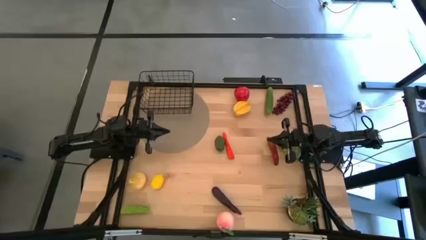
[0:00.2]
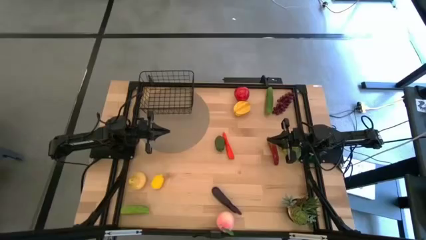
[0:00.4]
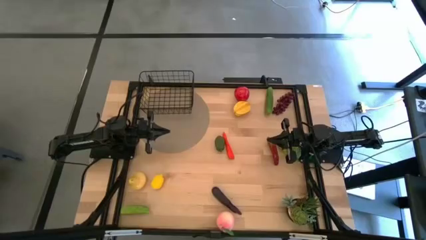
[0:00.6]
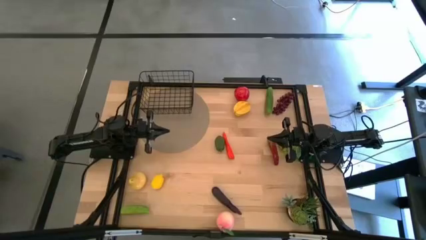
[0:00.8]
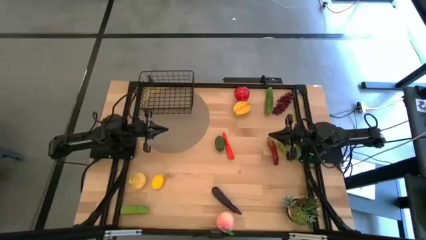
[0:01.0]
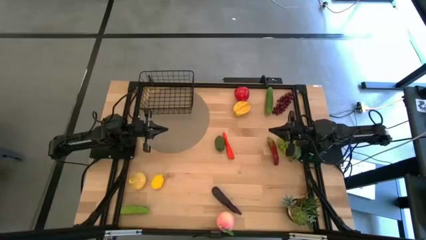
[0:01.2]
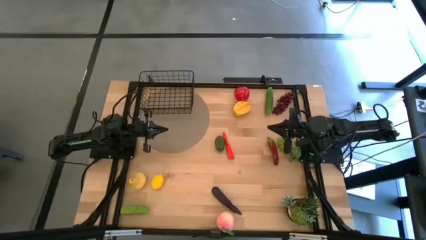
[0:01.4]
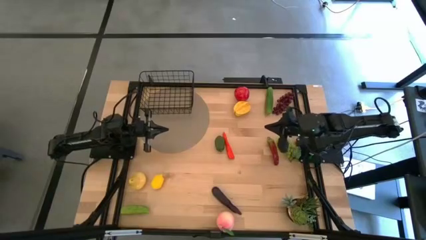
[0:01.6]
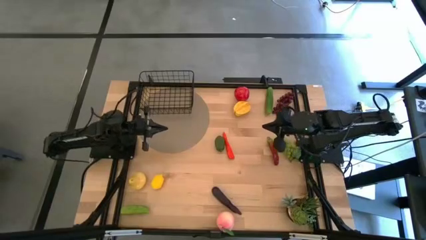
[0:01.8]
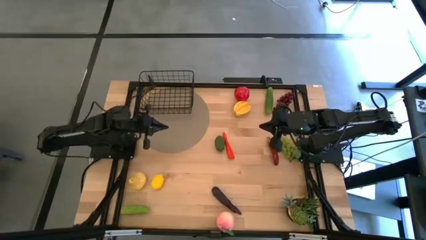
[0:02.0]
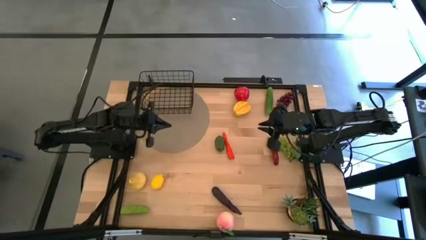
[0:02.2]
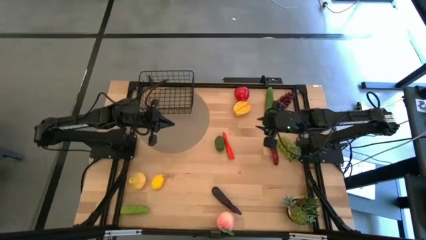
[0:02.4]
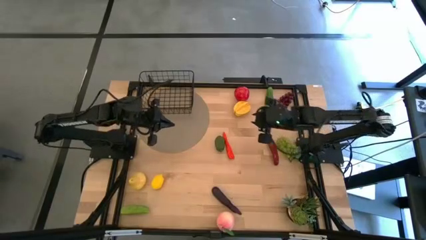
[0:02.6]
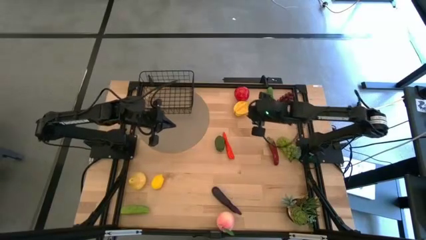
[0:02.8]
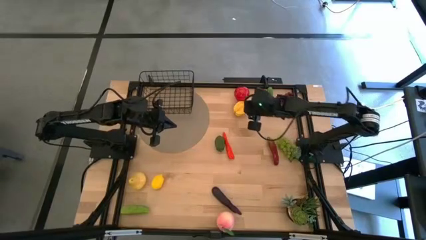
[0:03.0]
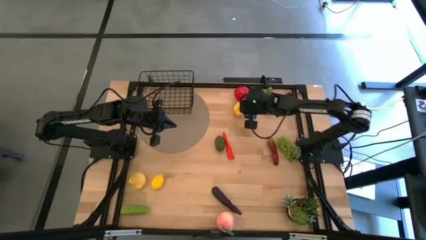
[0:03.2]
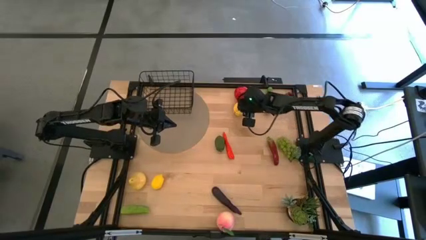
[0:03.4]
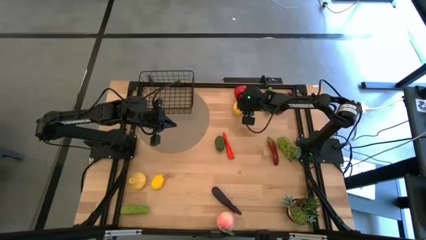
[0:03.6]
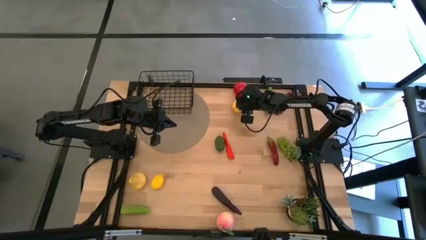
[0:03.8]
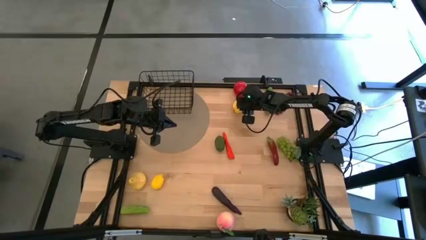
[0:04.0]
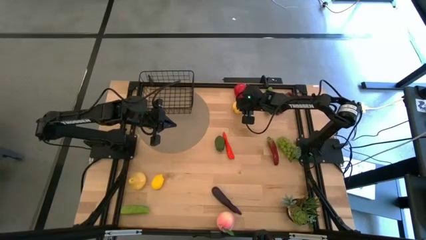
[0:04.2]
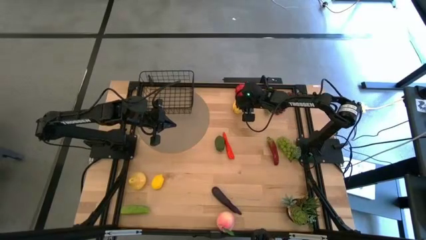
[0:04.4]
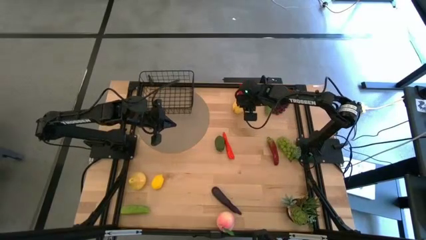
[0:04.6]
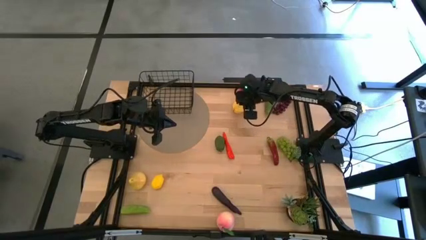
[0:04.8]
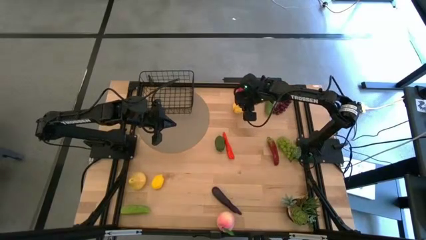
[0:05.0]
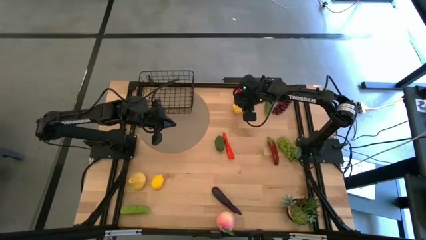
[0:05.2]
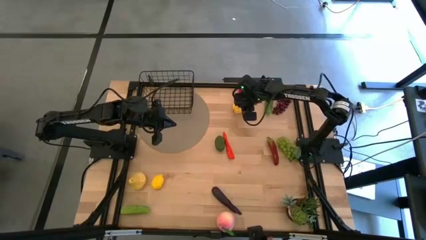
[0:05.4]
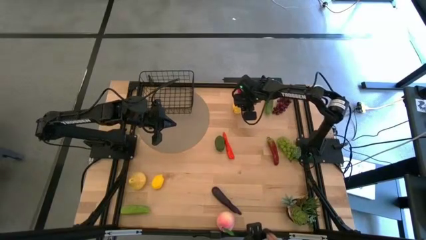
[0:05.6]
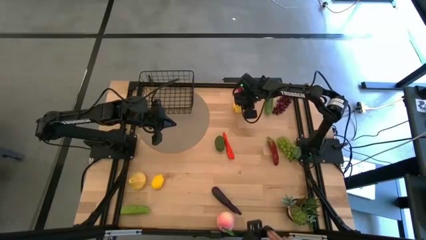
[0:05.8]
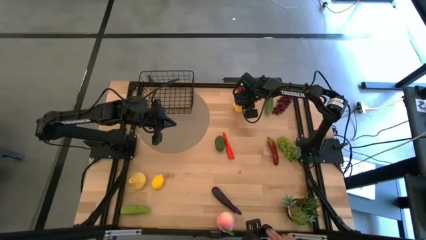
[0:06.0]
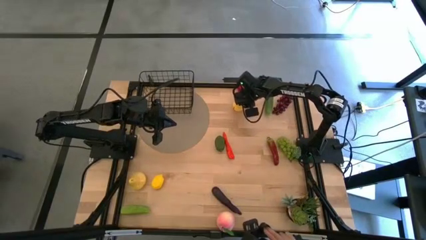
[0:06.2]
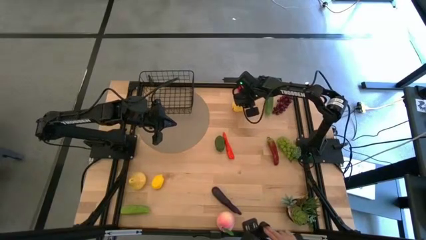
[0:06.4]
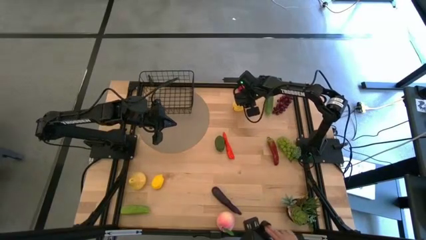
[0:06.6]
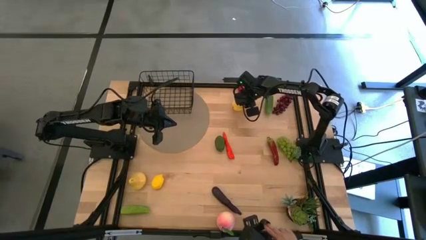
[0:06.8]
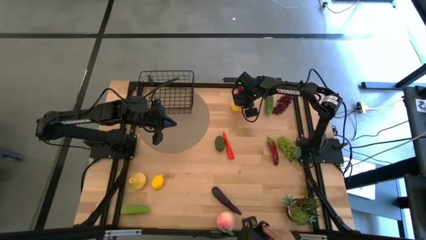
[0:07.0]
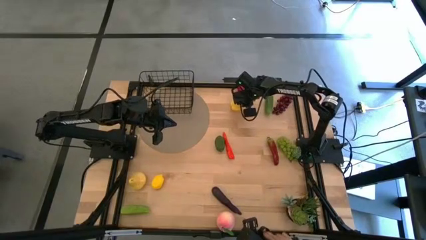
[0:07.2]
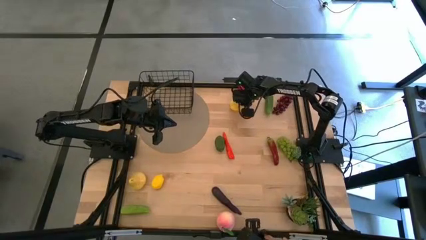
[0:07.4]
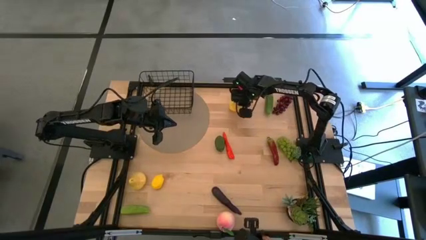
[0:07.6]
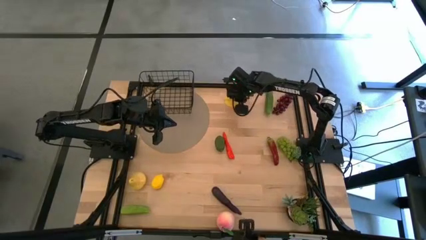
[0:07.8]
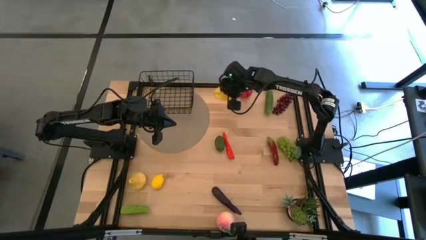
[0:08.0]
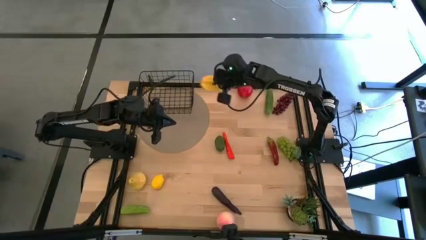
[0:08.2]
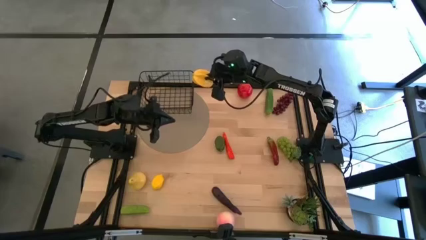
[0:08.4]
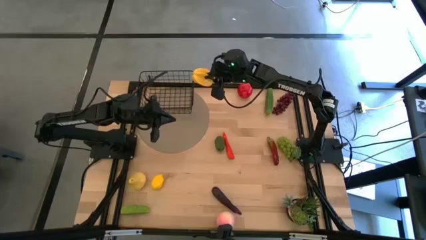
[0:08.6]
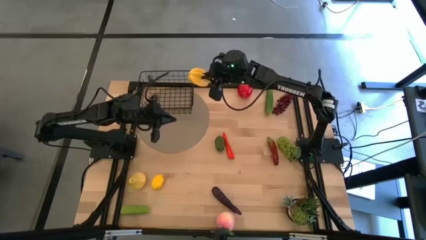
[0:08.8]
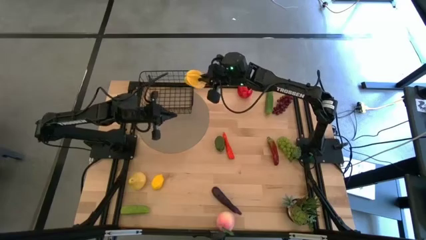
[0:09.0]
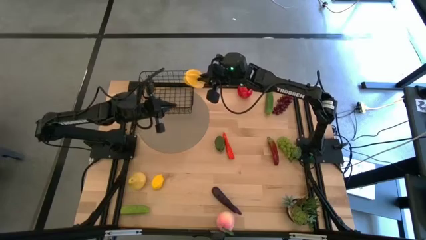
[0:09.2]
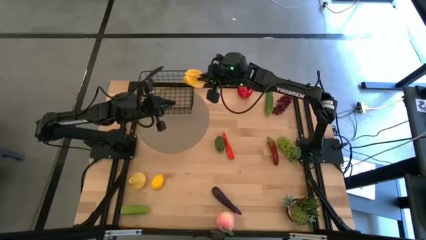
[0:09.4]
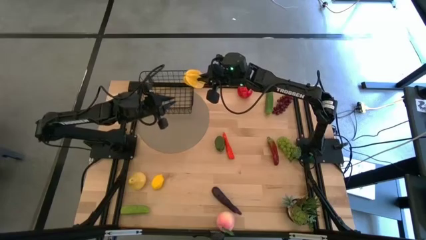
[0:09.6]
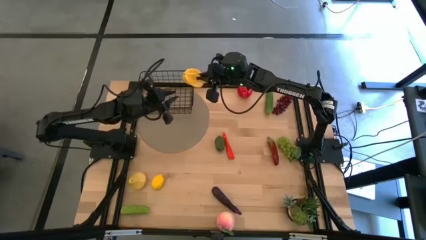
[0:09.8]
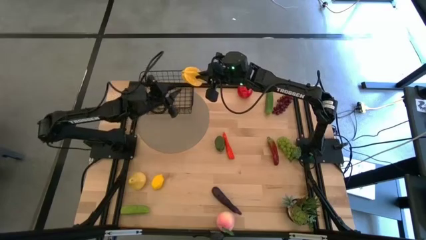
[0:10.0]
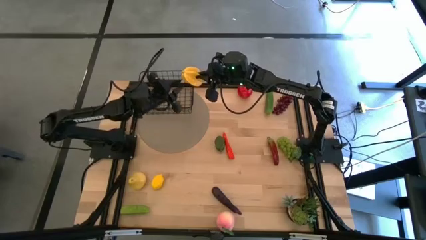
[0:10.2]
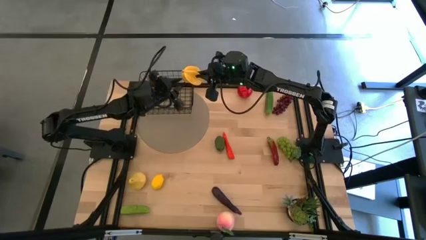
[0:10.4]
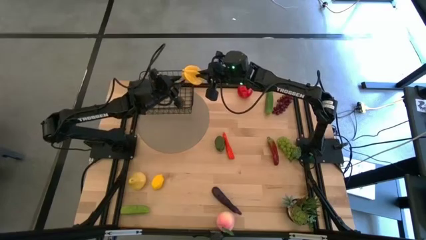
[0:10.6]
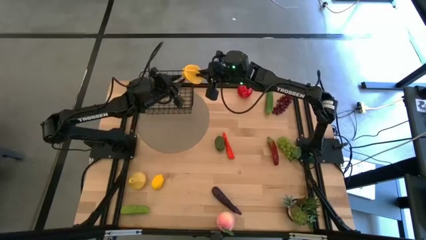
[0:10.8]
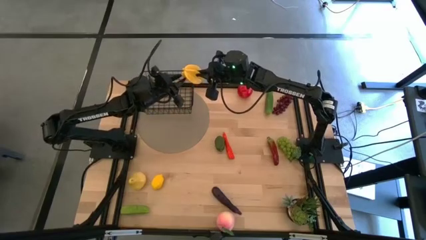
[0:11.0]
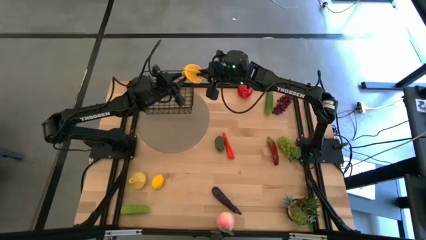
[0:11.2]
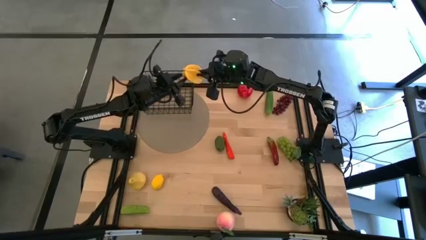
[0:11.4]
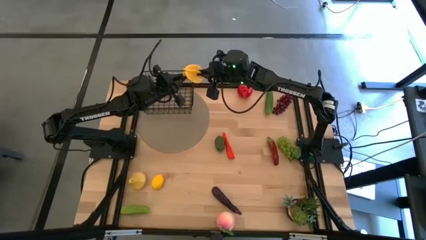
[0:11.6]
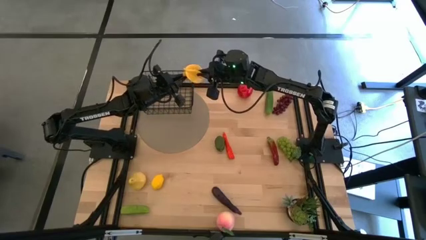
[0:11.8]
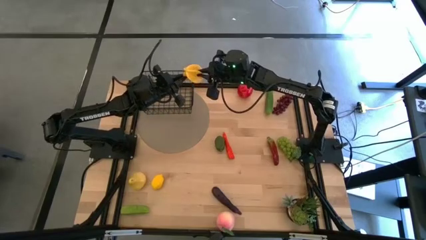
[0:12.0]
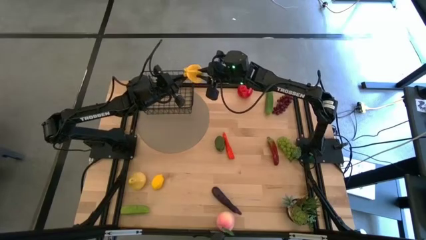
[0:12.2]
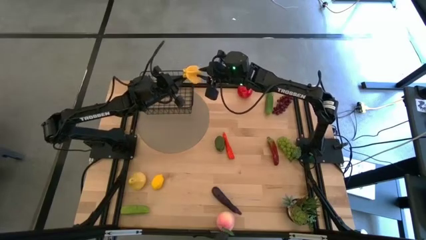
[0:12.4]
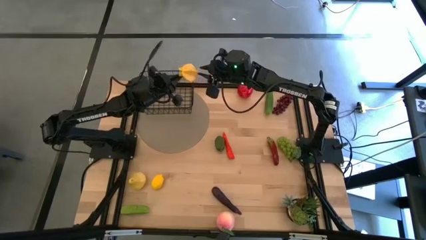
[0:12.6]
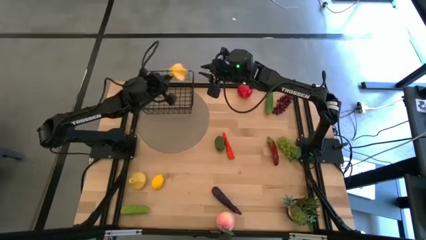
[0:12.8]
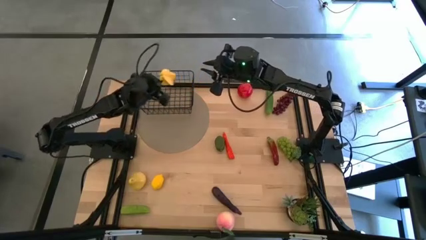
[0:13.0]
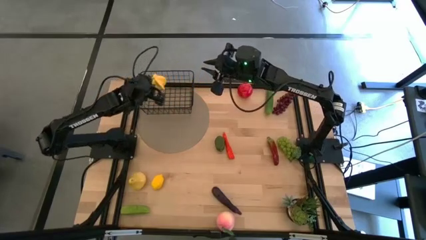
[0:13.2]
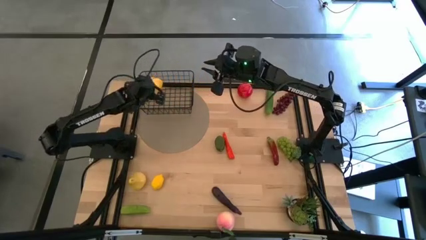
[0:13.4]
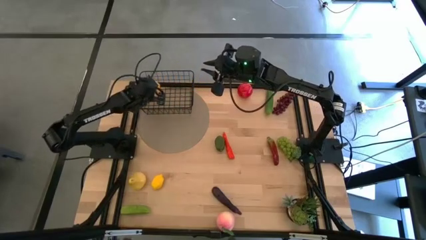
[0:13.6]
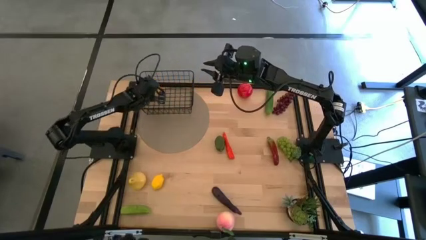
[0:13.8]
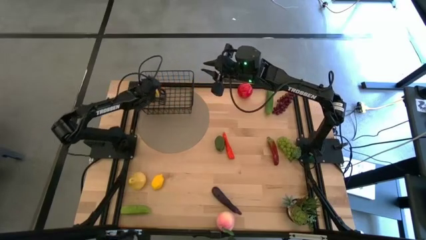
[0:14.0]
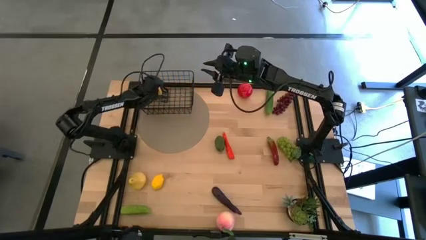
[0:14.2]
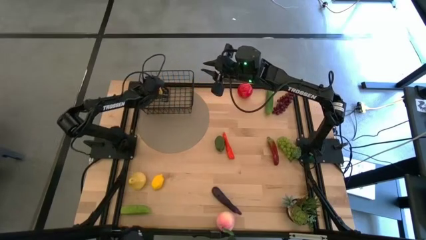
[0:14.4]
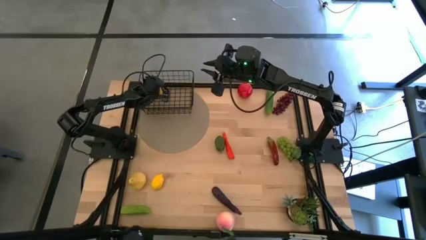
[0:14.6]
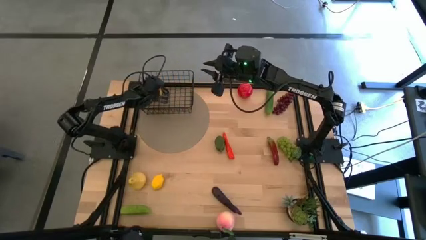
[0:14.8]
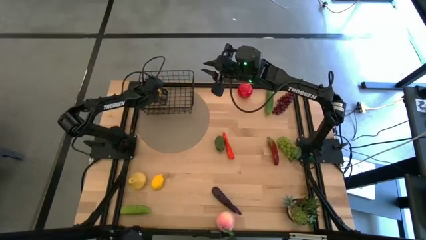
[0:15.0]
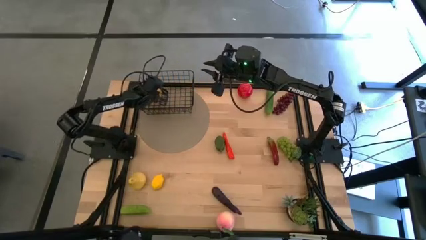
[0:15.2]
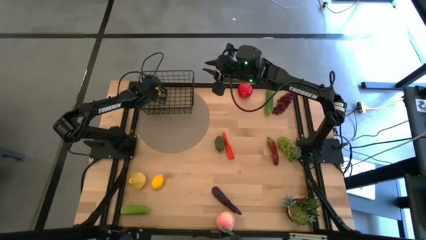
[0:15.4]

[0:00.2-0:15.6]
Task: Build produce basket
Put the yellow starfruit into the black wire basket
